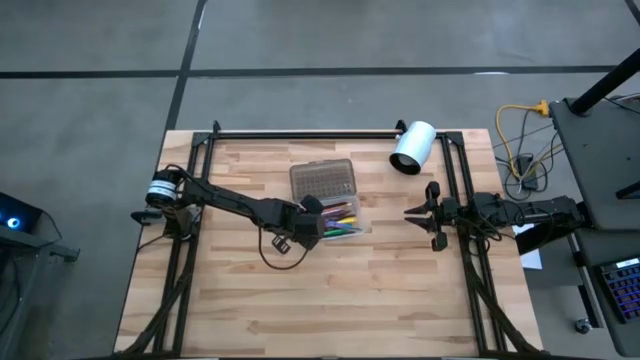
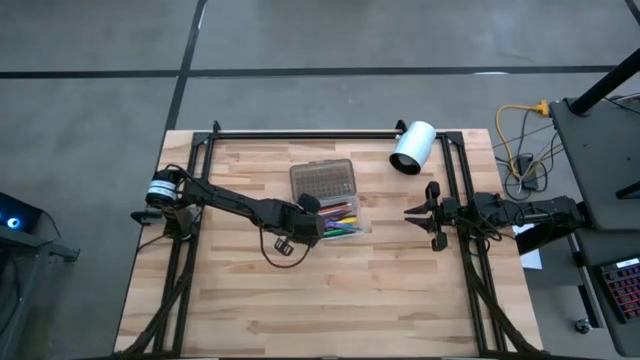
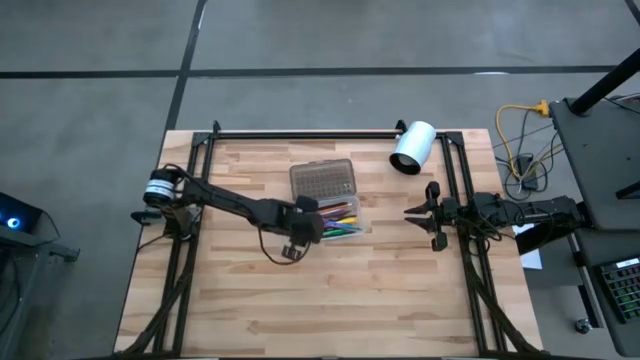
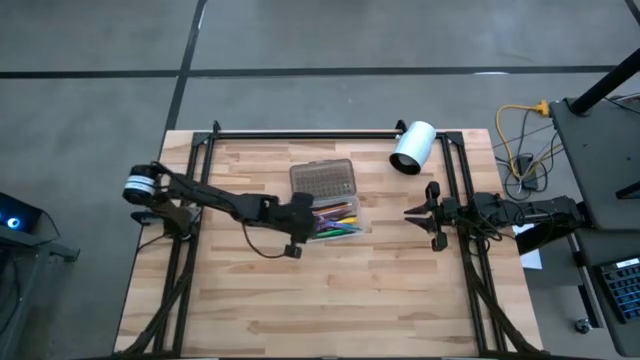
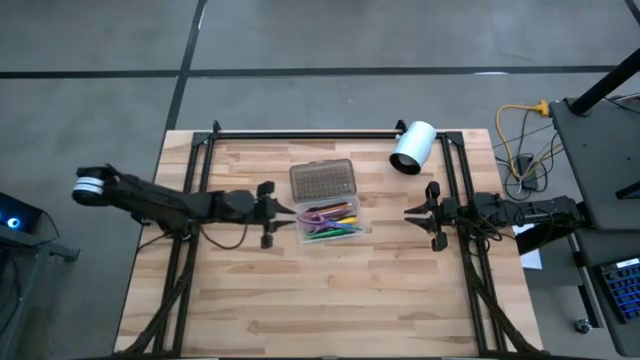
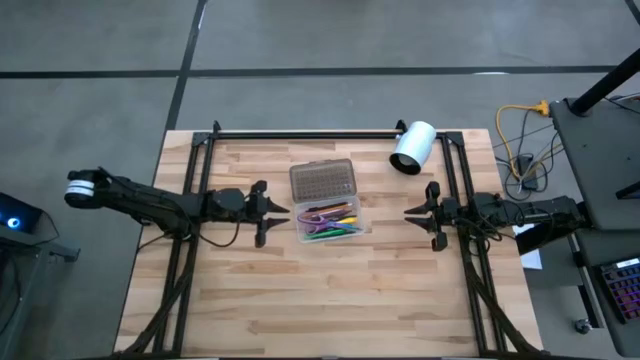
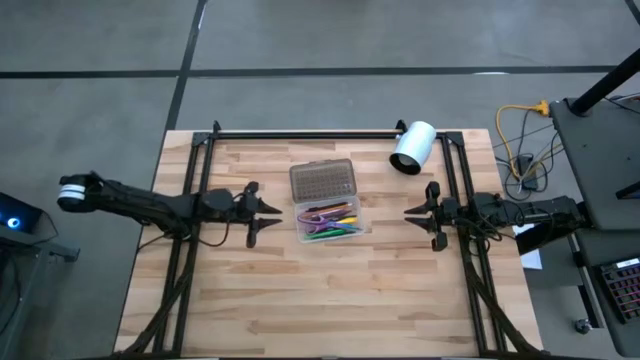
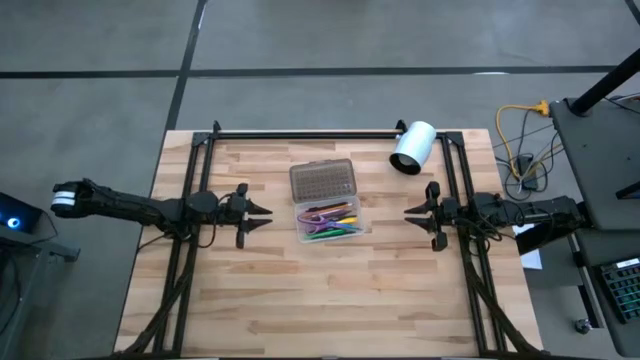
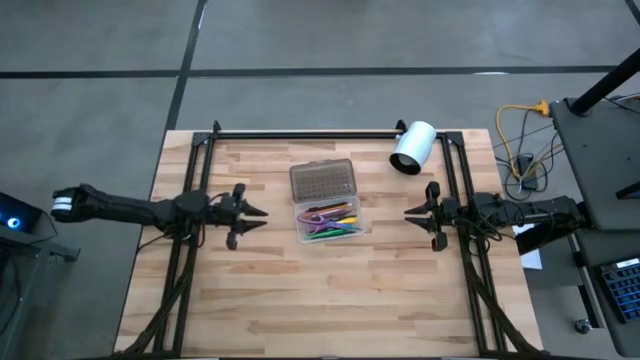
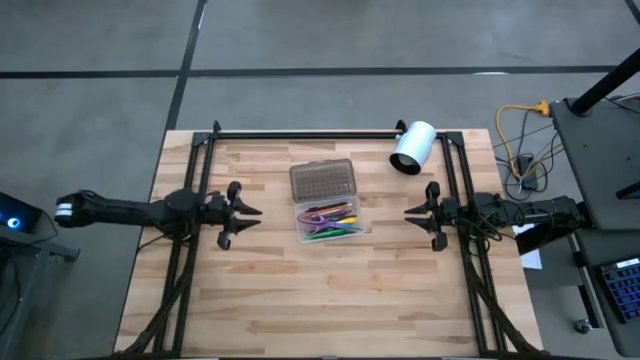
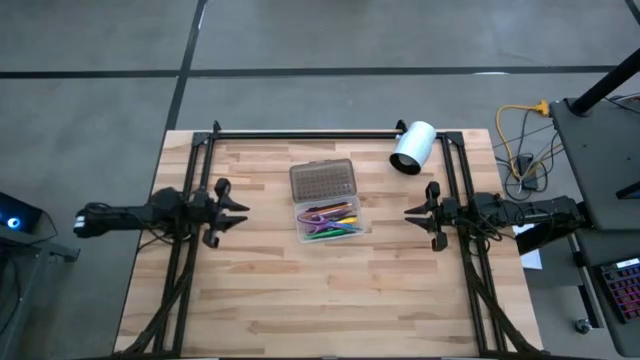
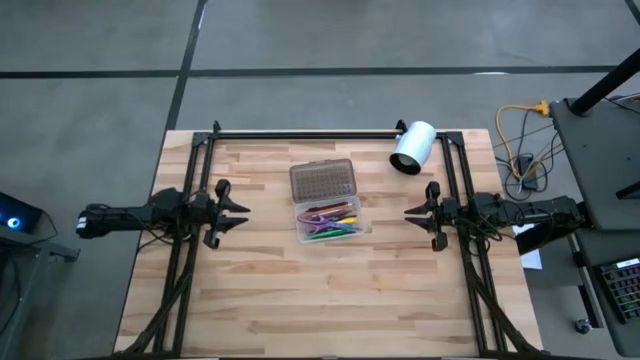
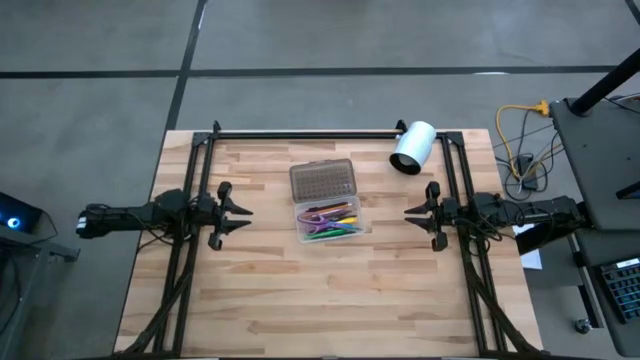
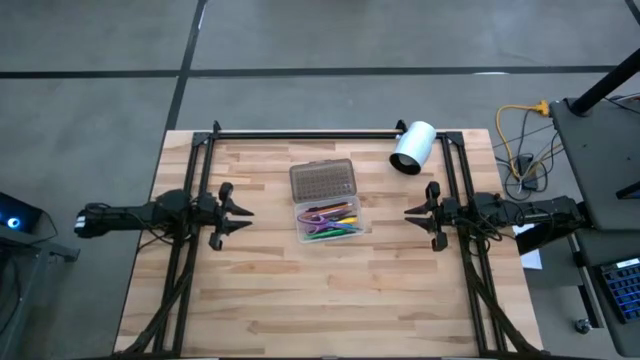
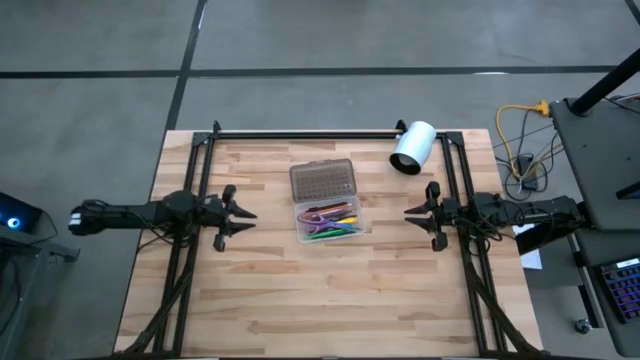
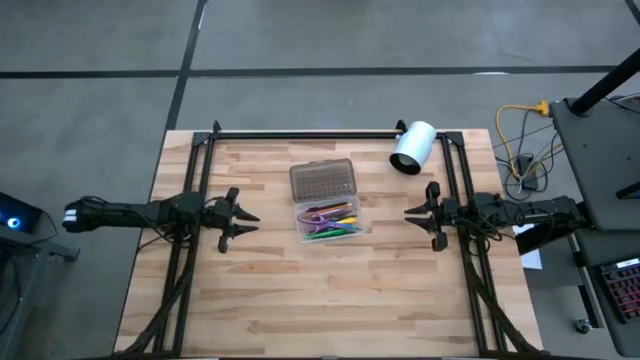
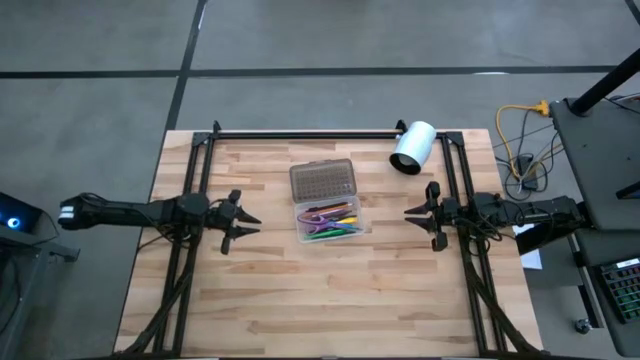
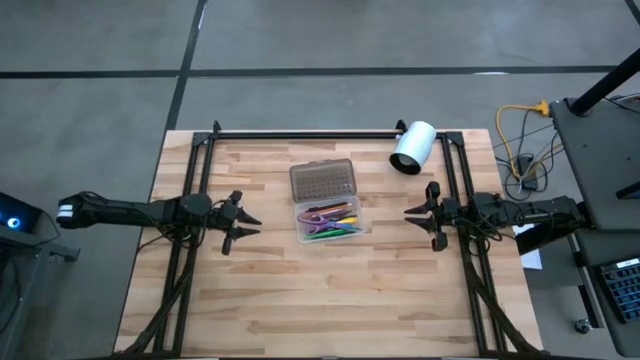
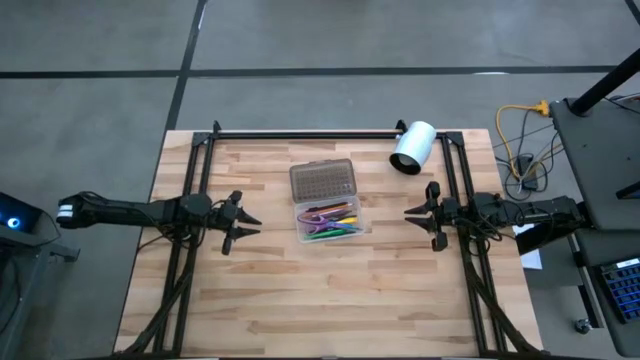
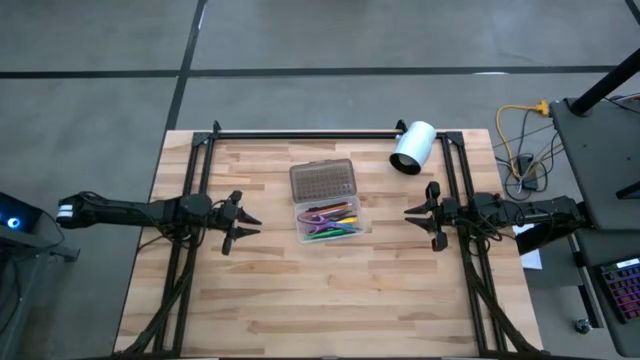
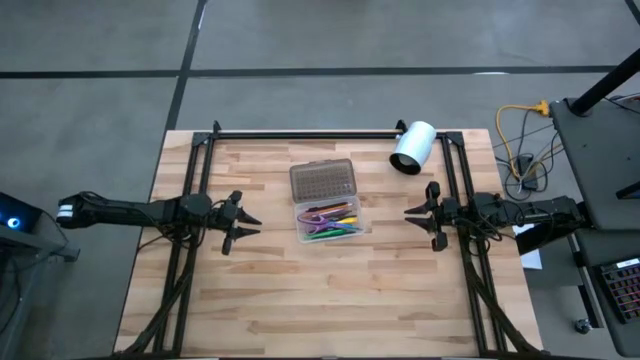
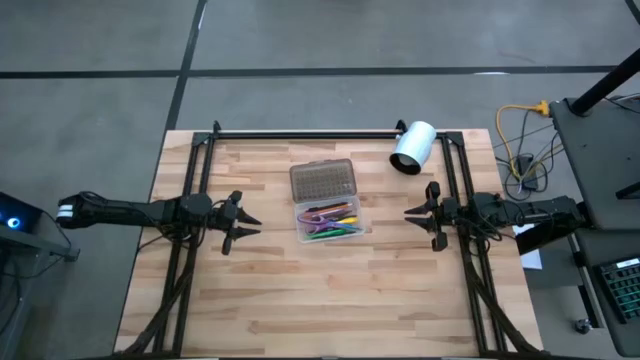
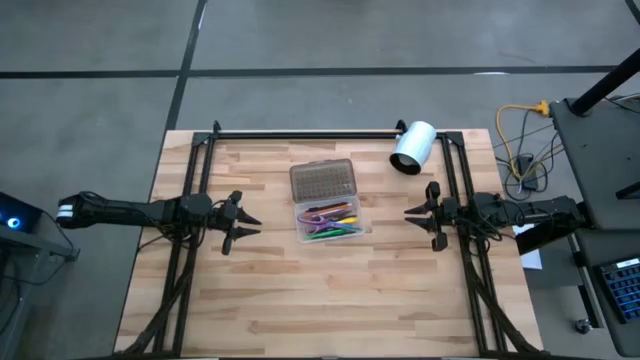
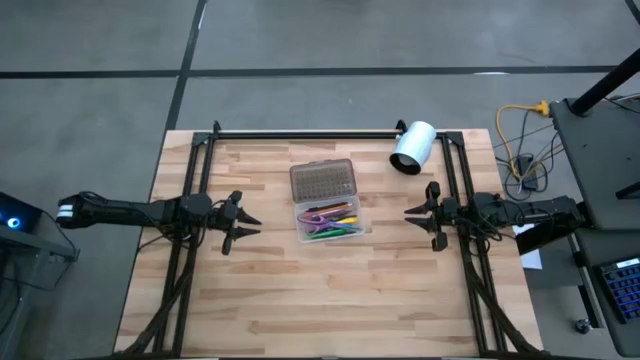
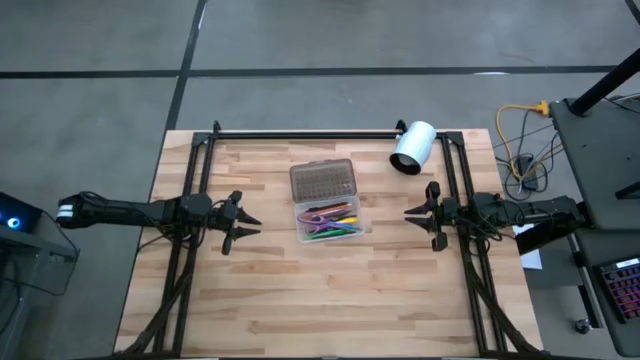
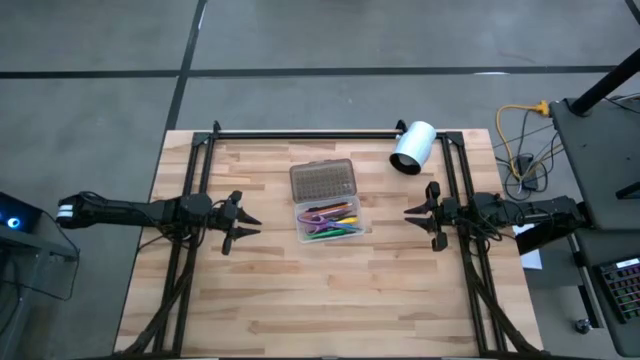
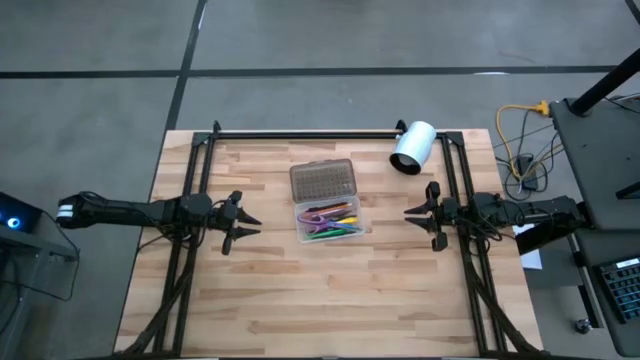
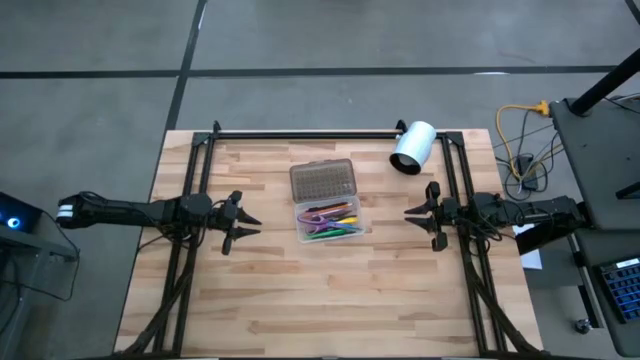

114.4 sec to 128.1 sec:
Task: Pick & place school supplies into a supply box
Return to Home Position

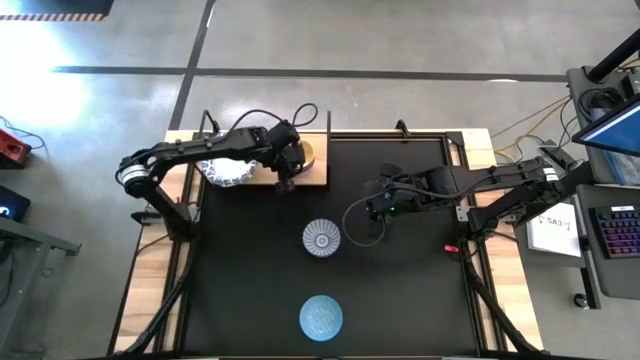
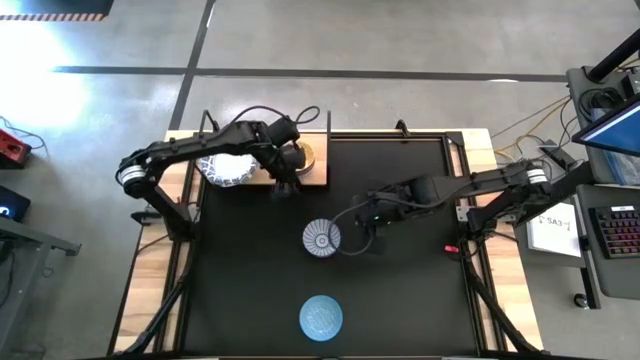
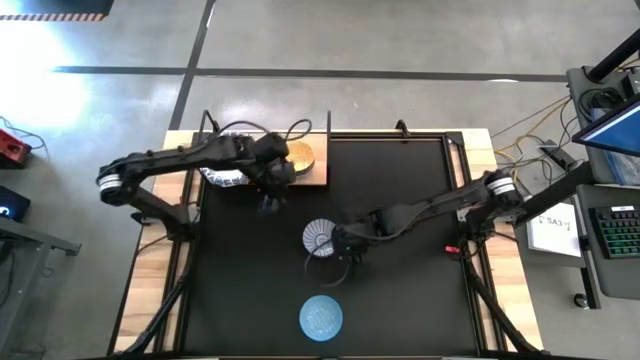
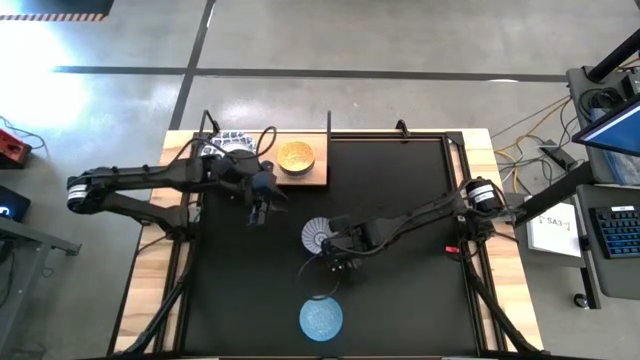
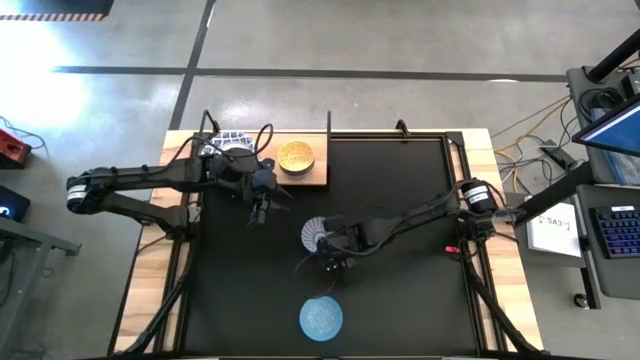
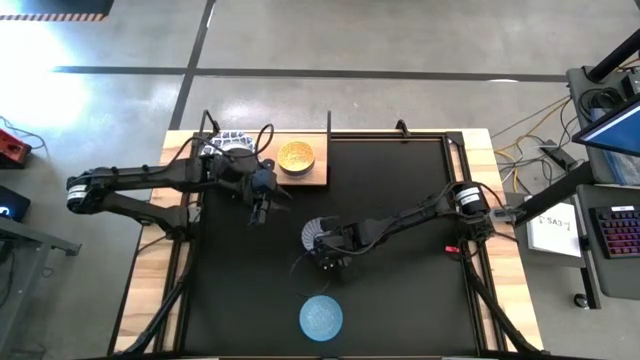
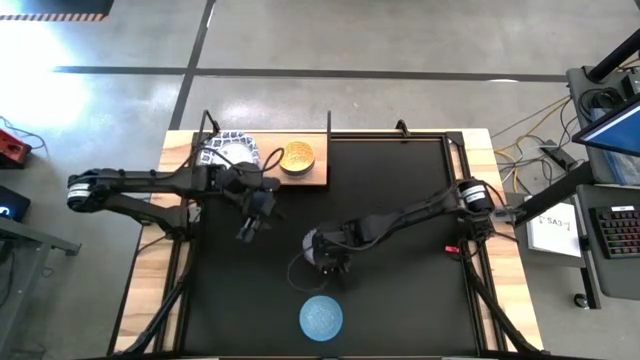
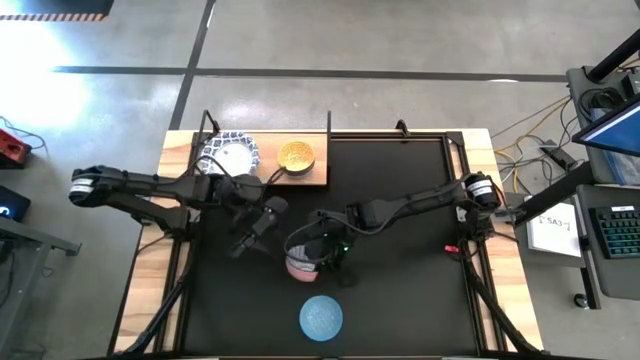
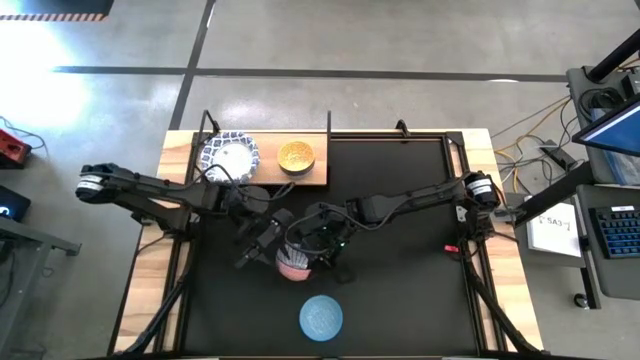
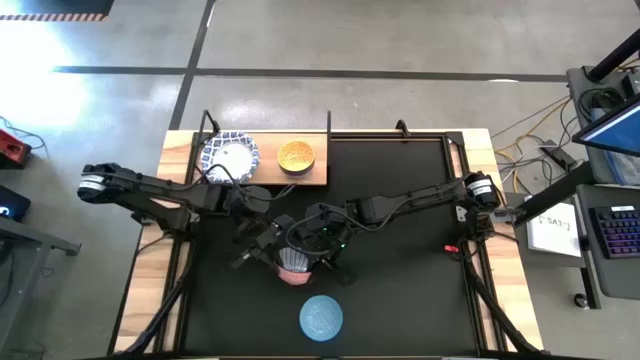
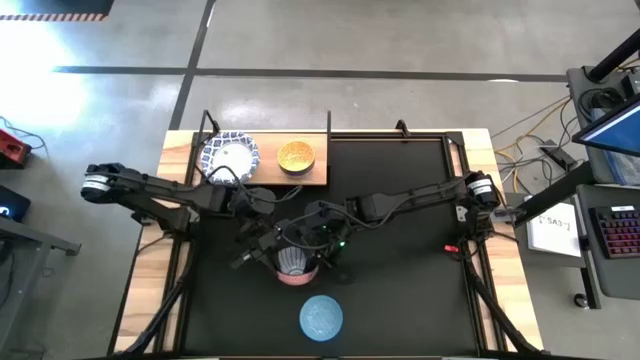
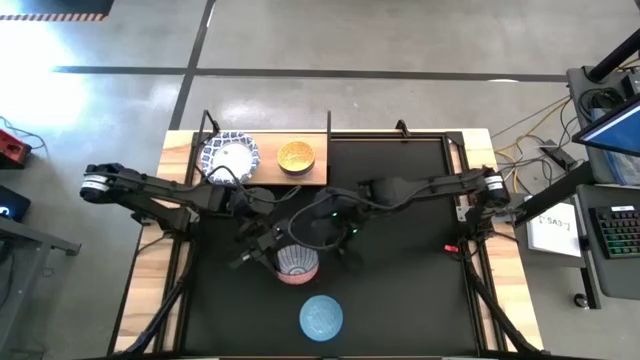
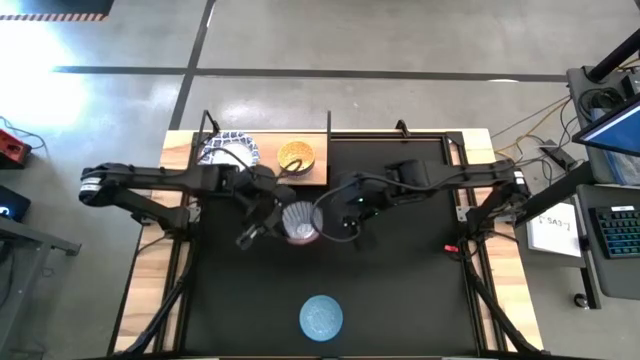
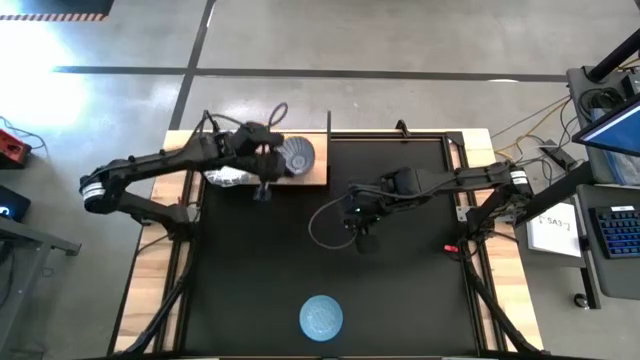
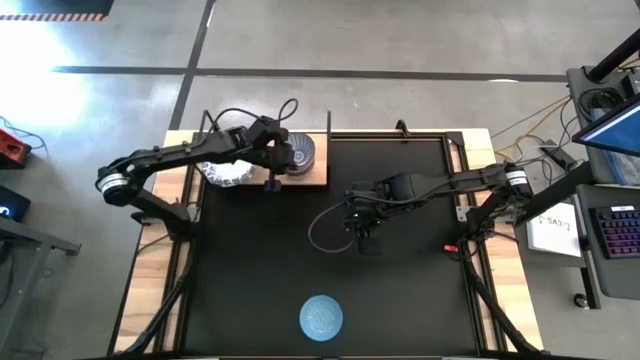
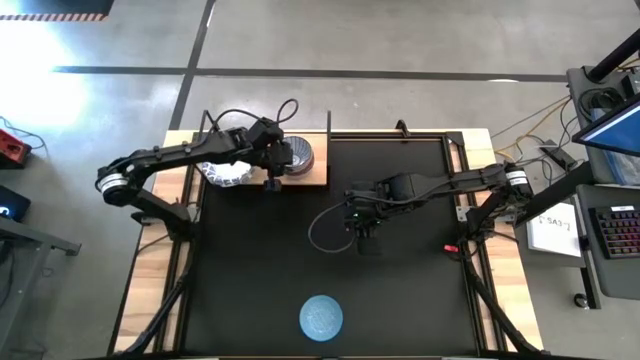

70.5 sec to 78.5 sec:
Task: Place and stack bowls onto a shelf
Stack the dark blue patterned bowl on top of the yellow patterned bowl on the shelf
